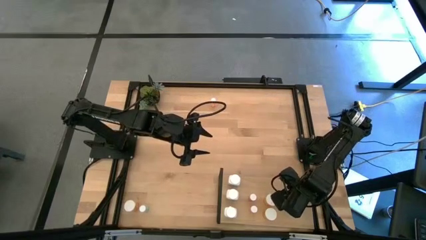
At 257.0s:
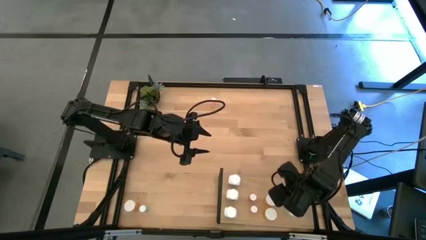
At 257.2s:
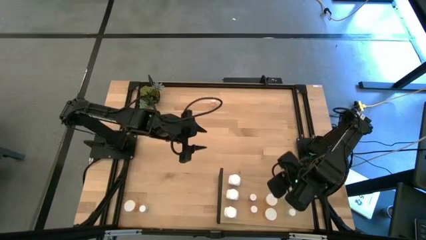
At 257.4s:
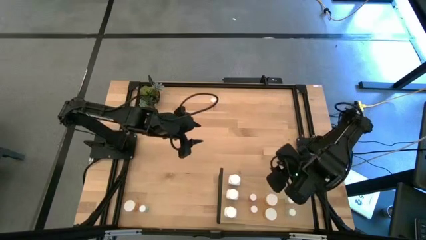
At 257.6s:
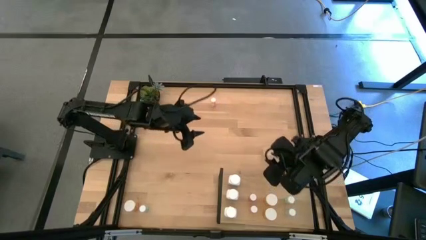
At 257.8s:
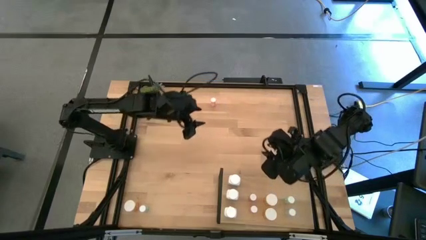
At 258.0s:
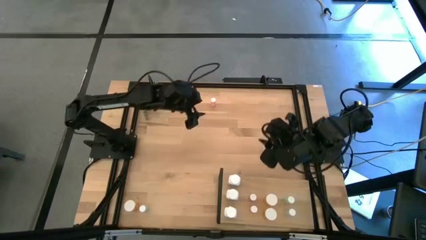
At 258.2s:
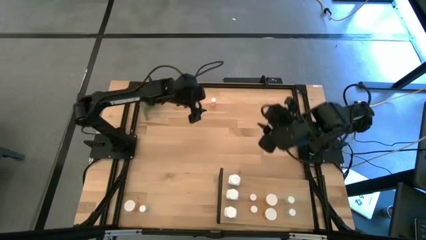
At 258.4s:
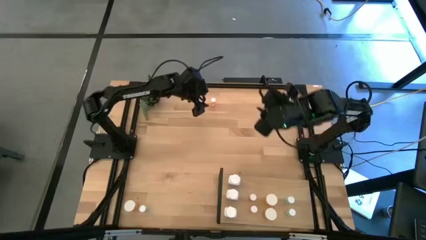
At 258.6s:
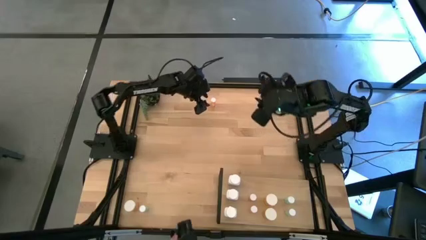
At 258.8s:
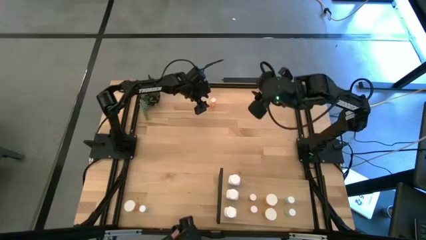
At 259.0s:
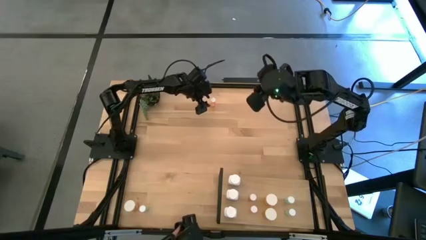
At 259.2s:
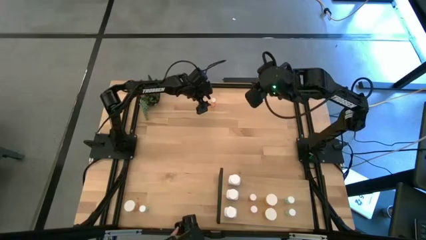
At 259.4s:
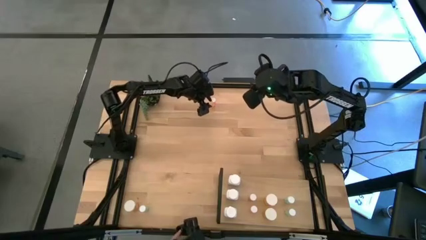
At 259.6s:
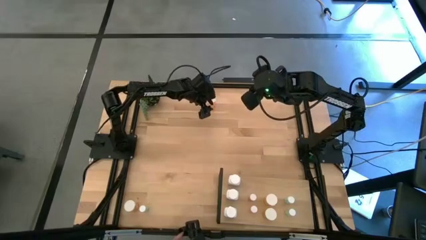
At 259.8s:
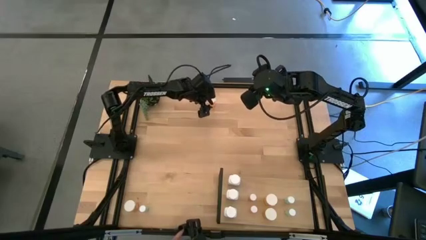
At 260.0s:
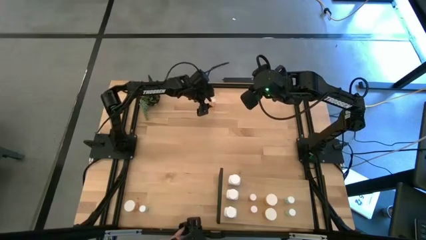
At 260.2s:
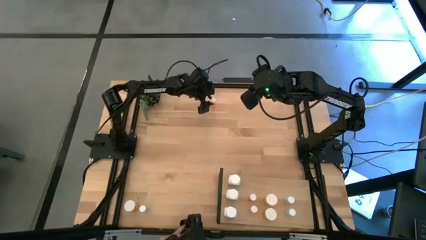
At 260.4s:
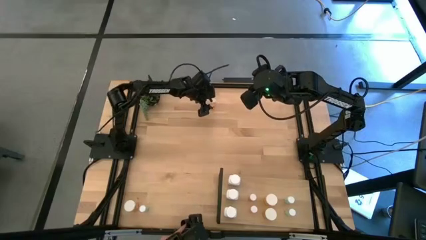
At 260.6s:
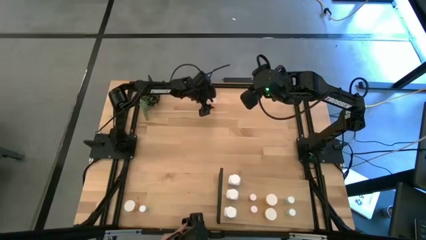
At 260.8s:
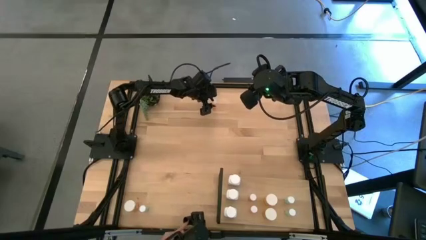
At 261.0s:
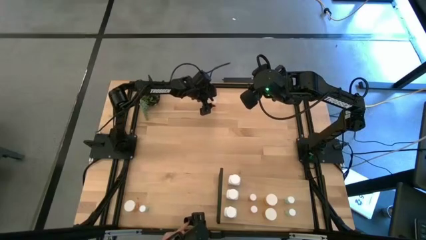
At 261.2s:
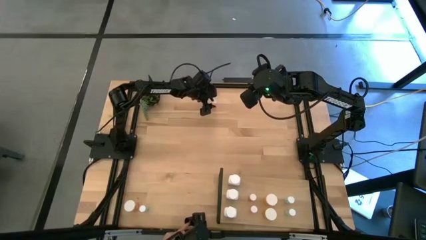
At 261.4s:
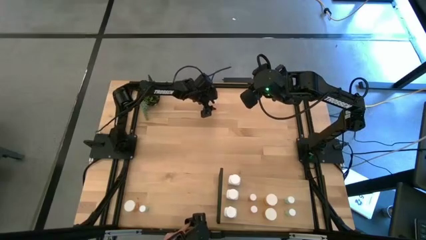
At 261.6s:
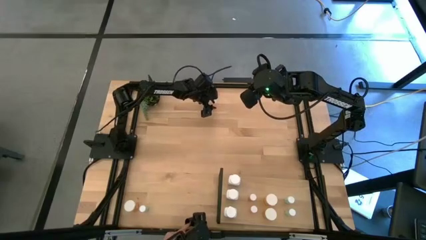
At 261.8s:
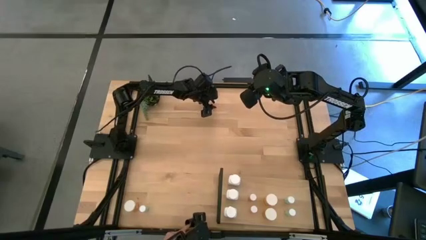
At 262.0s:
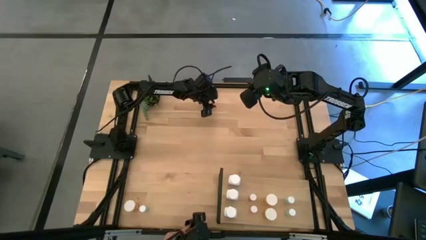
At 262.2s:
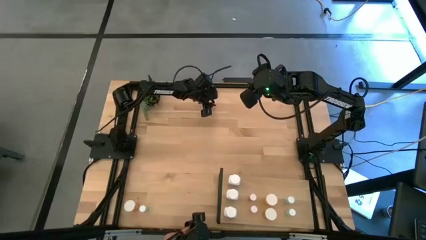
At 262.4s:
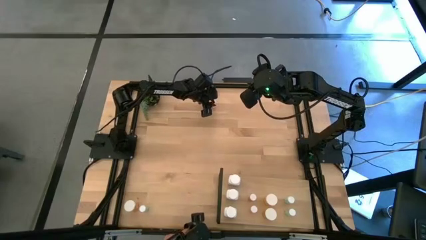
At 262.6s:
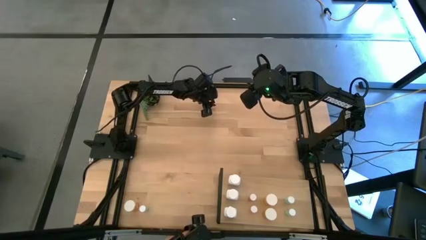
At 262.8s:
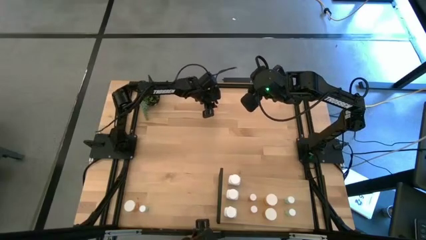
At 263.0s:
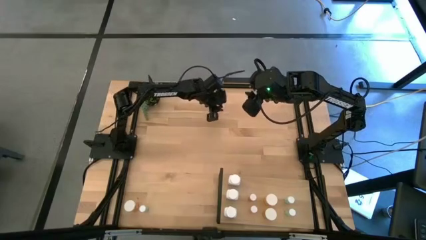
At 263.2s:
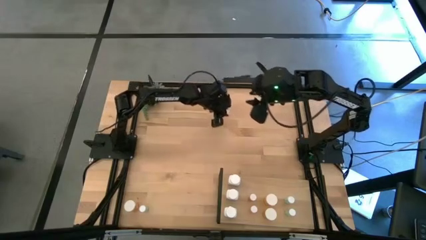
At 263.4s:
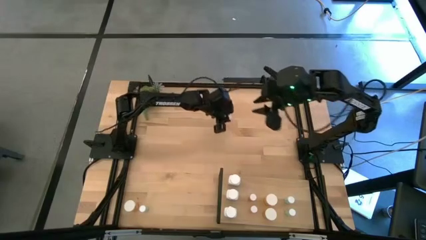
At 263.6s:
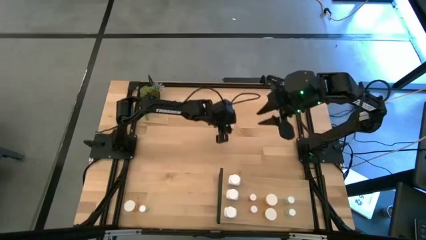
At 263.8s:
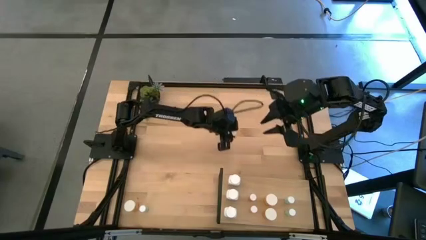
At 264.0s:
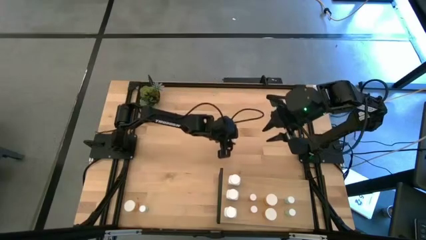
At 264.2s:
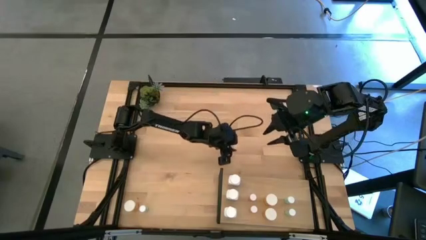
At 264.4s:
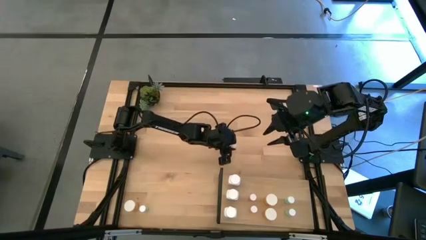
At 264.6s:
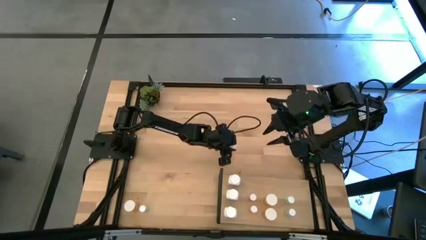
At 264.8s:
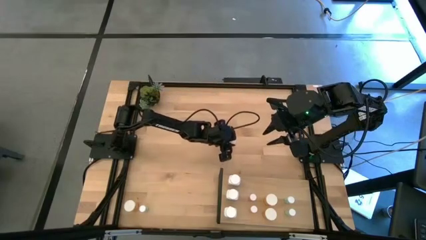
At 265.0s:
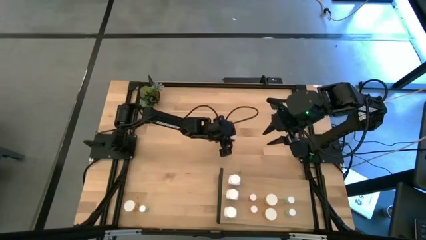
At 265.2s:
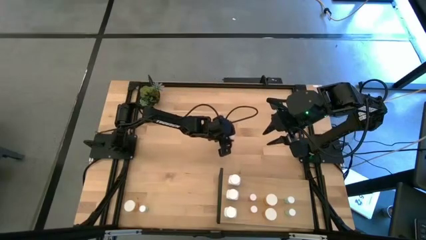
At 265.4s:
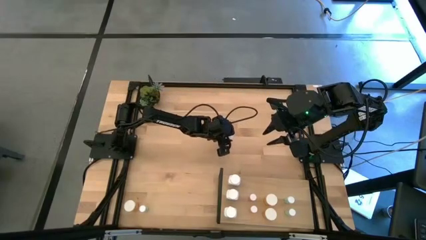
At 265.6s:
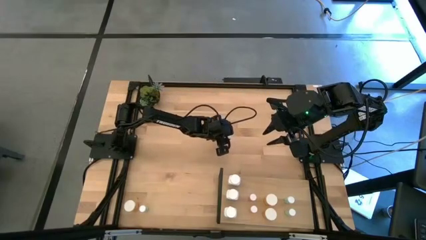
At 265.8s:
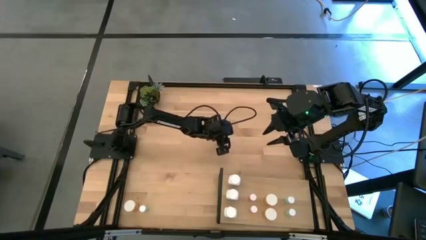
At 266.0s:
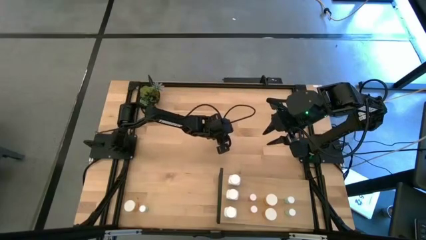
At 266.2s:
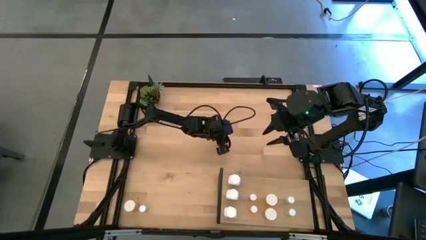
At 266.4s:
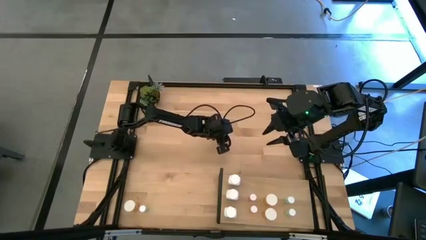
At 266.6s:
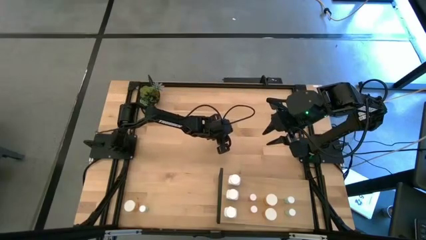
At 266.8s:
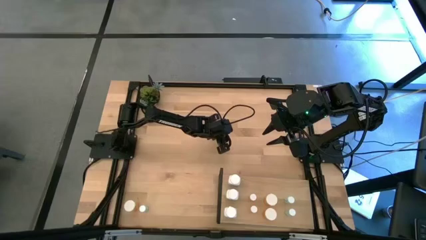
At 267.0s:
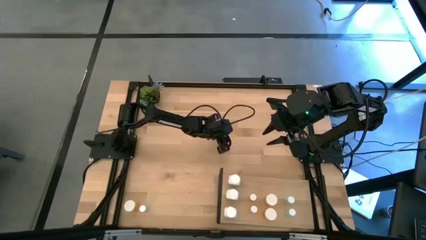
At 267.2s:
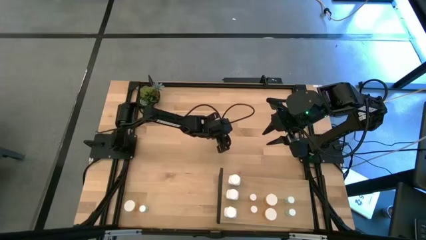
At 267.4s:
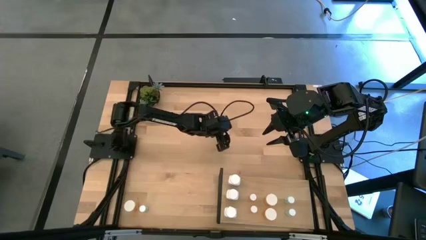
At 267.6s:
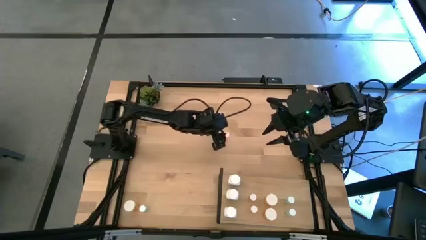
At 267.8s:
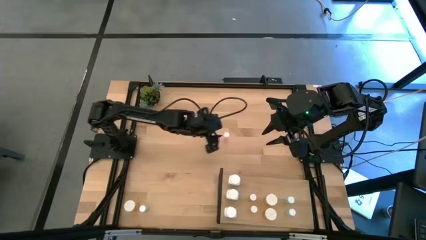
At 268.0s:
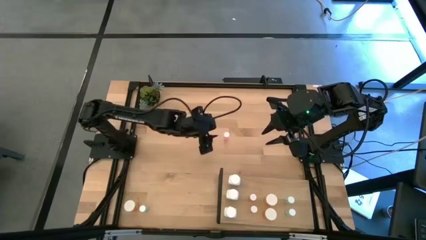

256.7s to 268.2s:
Task: Pick and place medicine bottles onto shelf by color
Put the top pink pill bottle on the shelf
